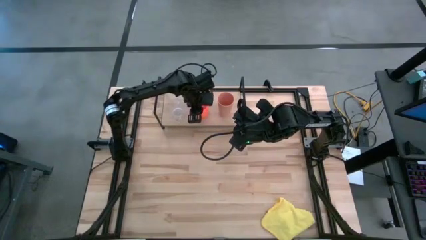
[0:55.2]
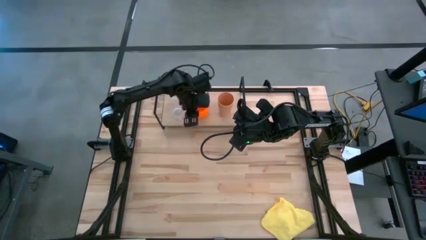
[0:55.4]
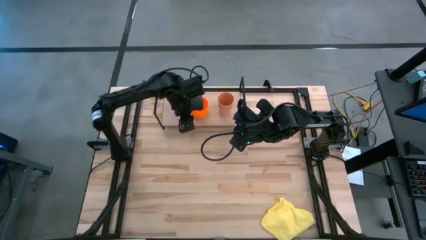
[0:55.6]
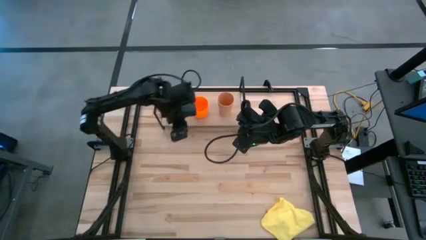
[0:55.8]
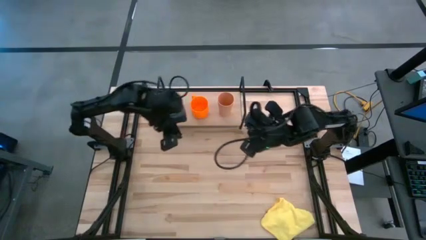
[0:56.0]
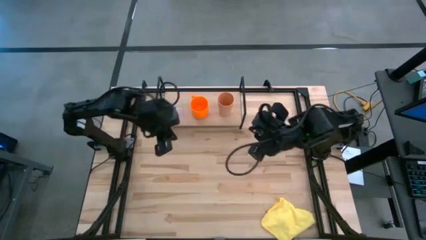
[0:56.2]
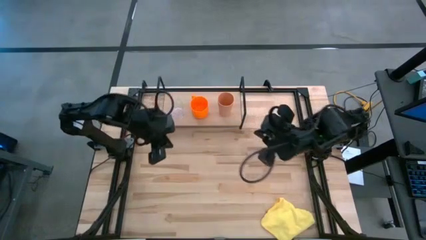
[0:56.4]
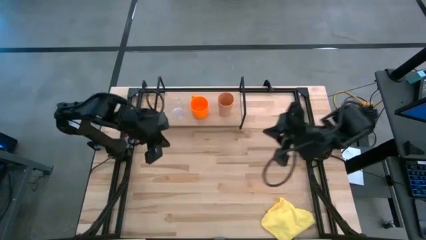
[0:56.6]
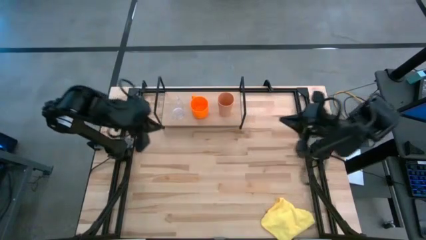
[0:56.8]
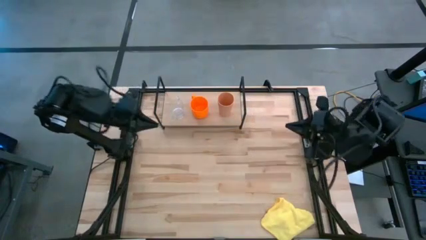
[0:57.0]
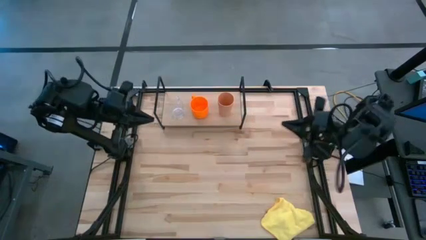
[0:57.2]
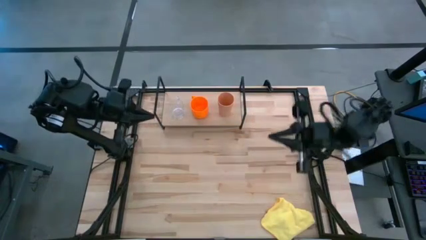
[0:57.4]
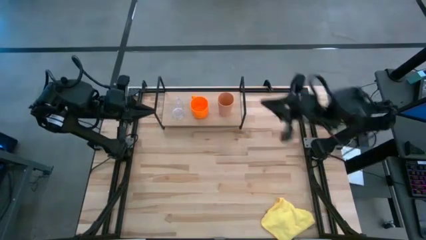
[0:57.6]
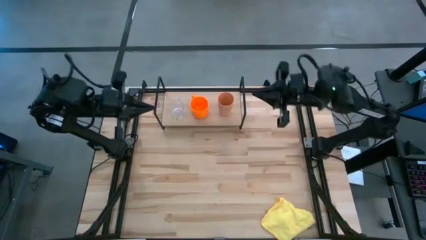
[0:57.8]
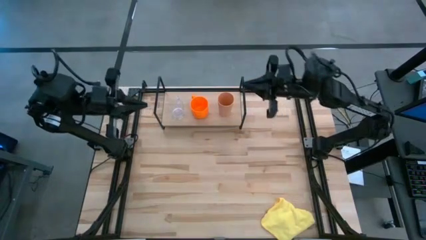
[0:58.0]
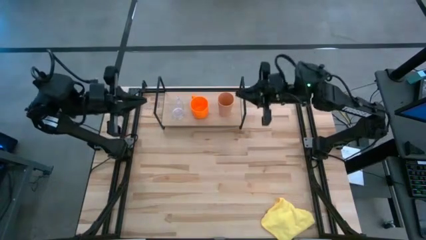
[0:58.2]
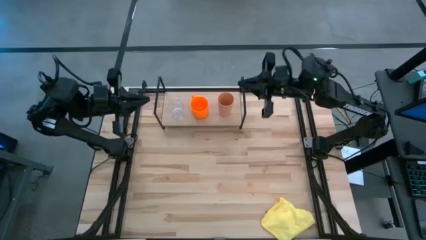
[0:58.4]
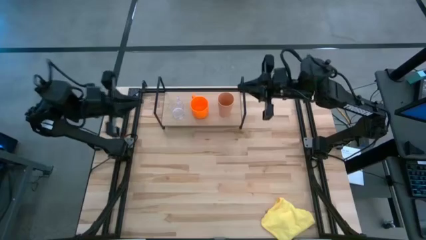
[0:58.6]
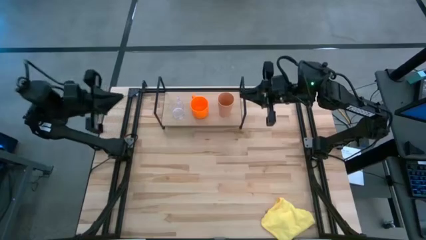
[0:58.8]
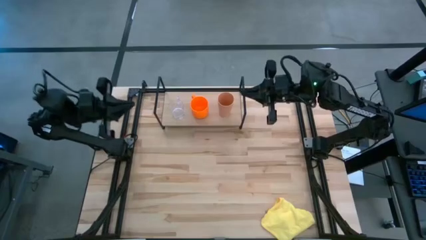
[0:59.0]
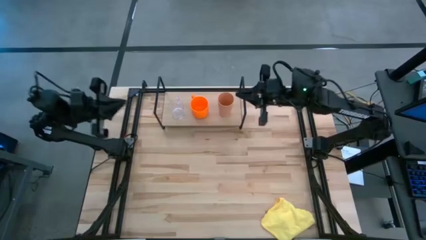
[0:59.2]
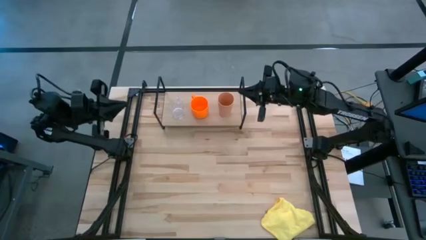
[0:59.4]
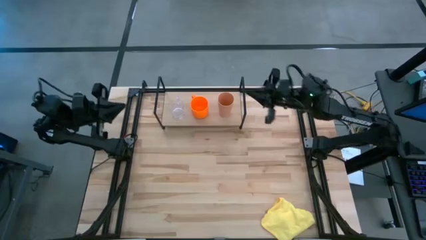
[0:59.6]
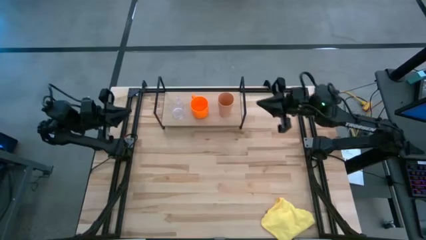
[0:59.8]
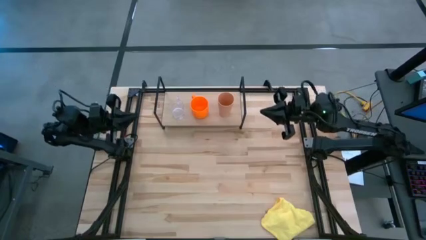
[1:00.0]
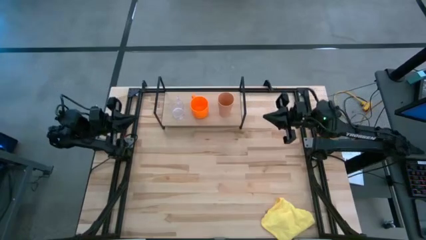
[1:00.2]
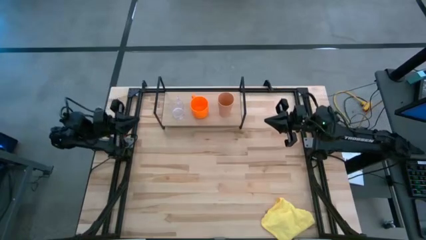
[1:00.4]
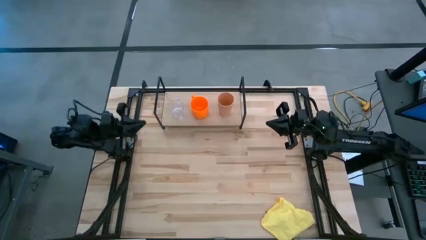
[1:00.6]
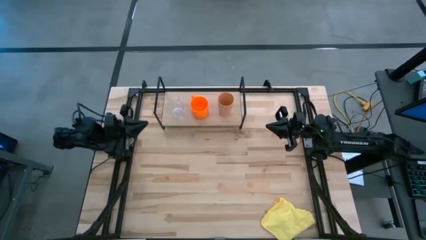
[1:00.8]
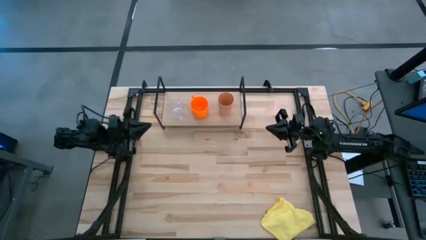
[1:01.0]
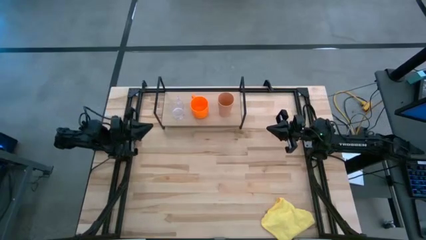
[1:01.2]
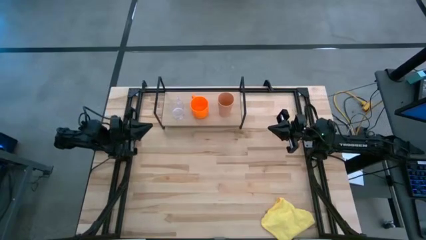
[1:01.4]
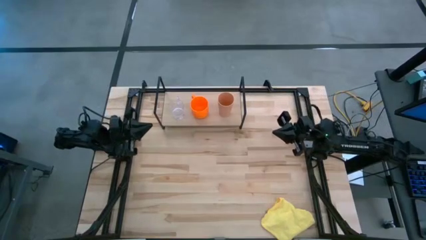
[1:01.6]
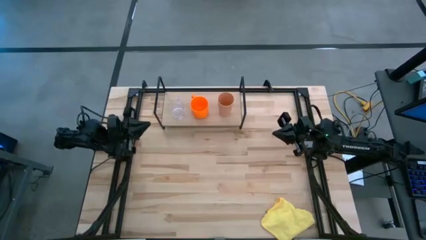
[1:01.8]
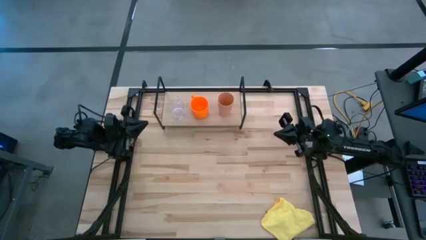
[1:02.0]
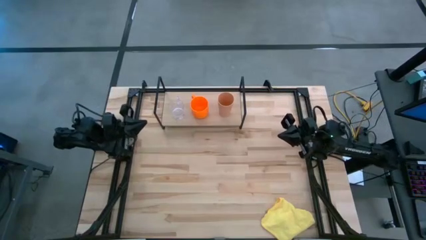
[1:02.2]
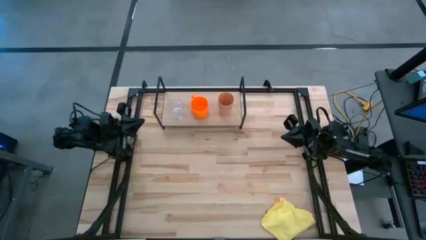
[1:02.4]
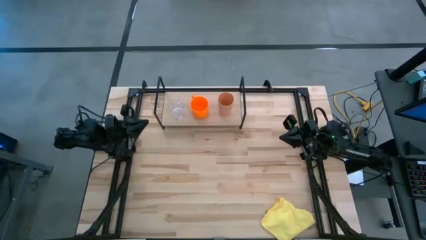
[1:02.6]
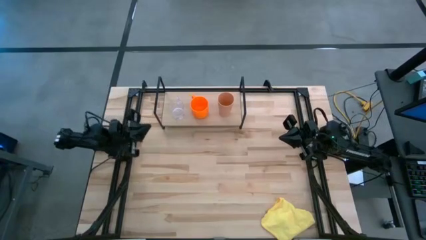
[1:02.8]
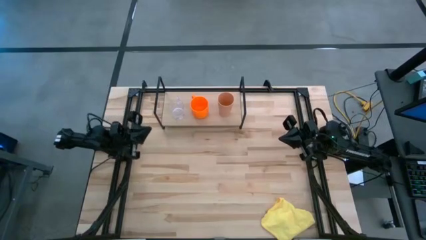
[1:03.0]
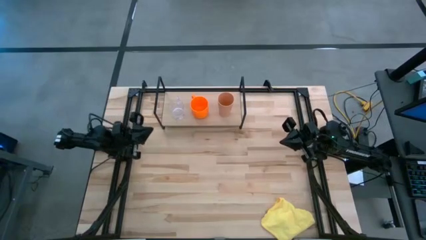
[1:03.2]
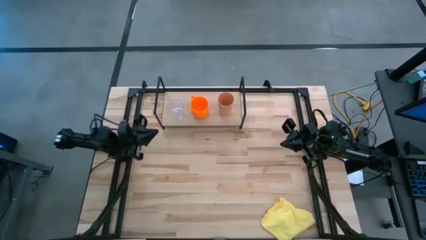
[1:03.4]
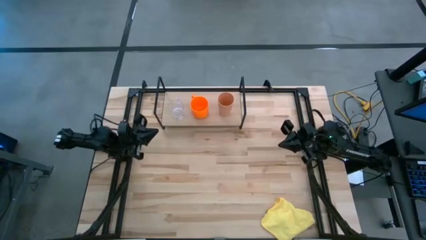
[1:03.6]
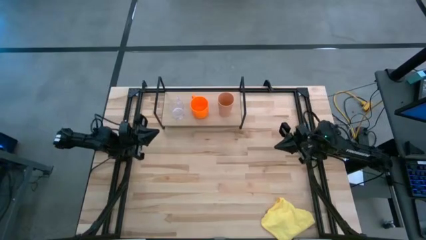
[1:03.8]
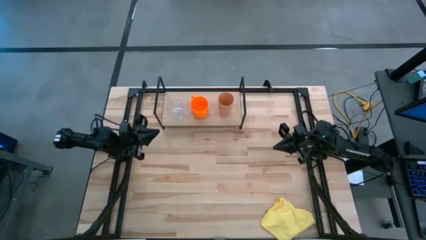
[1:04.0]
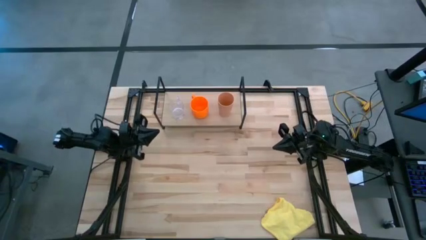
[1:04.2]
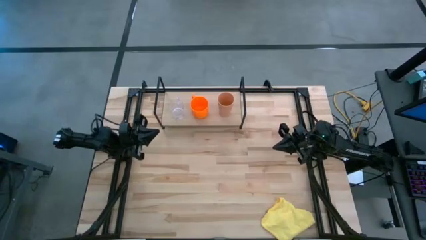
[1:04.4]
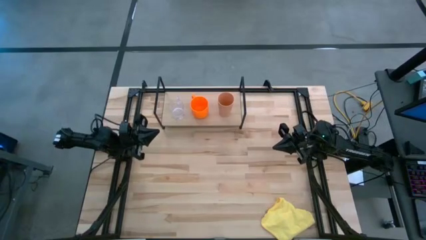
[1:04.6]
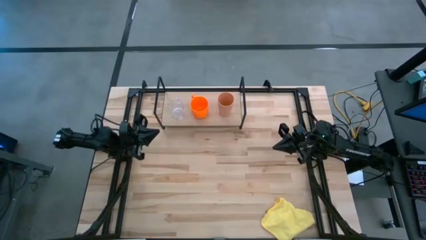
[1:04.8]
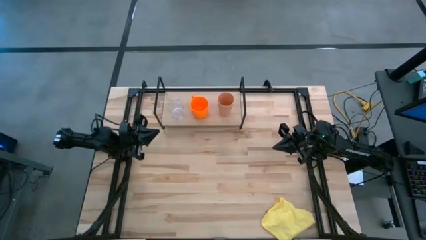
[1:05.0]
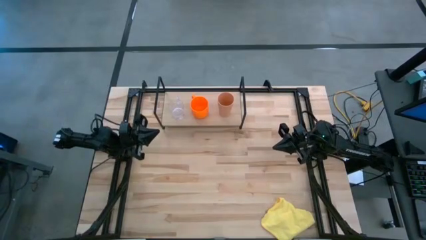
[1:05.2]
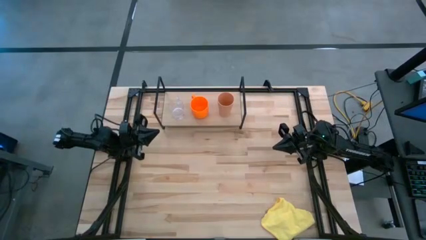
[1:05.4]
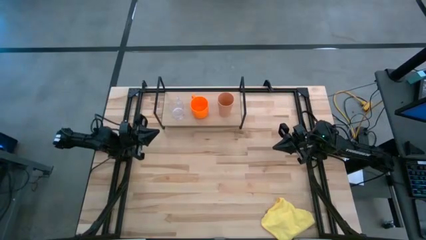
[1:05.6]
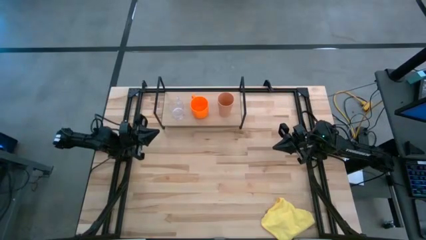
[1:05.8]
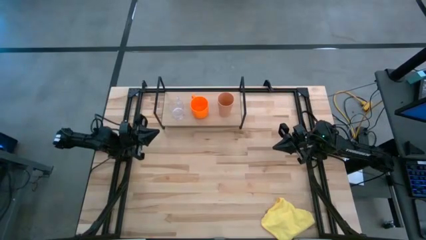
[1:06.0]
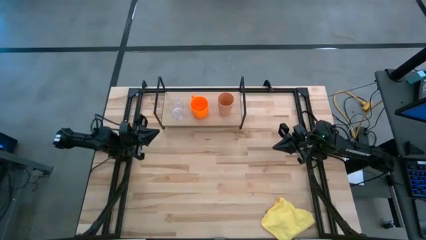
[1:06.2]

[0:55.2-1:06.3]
Task: Stack small to large cups/mugs on shelf
Return to Home Position
